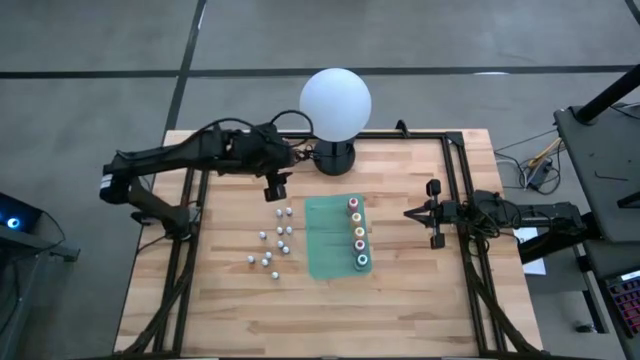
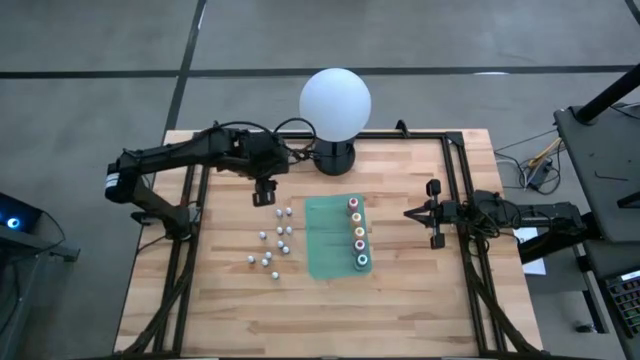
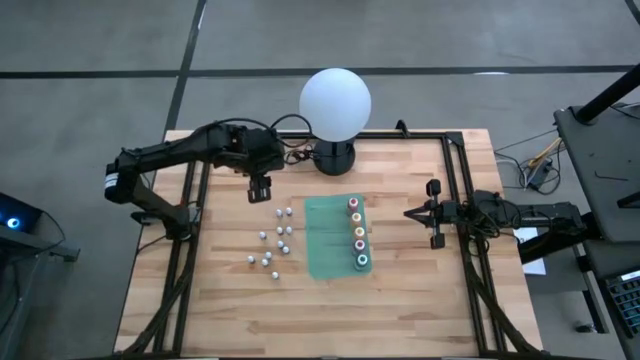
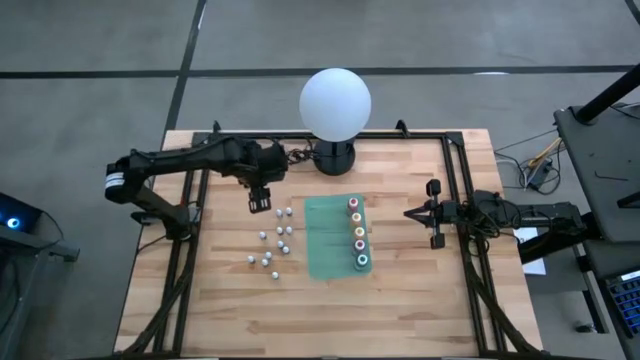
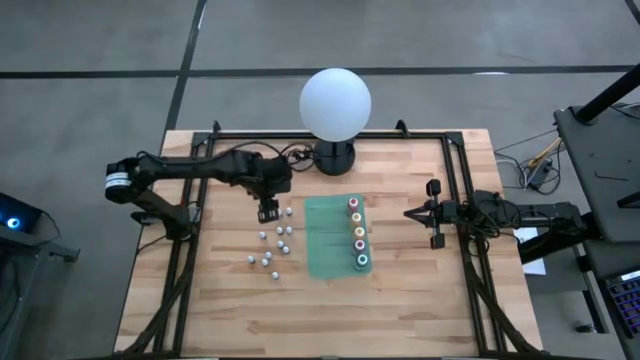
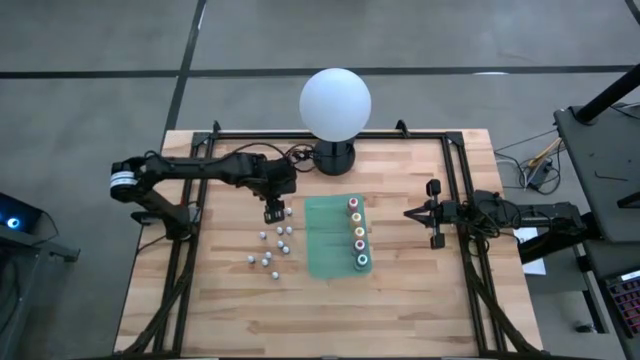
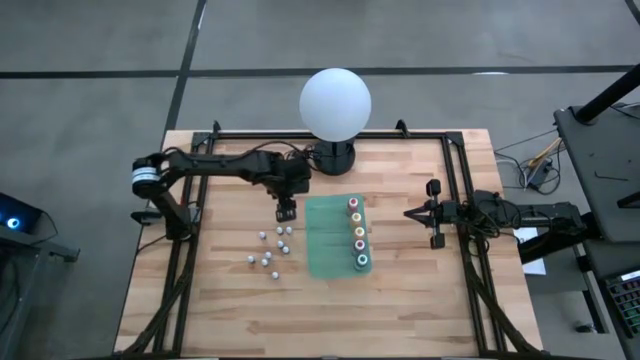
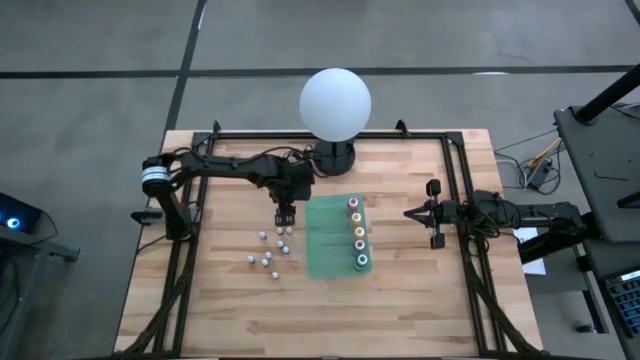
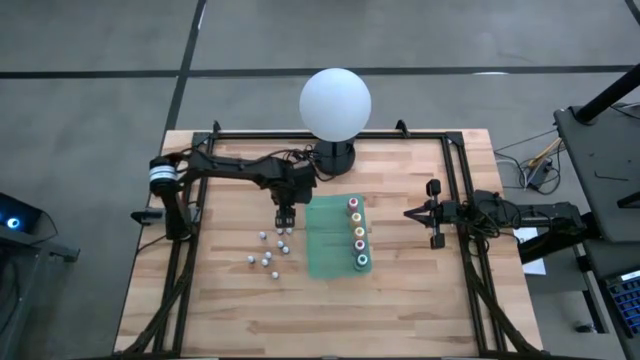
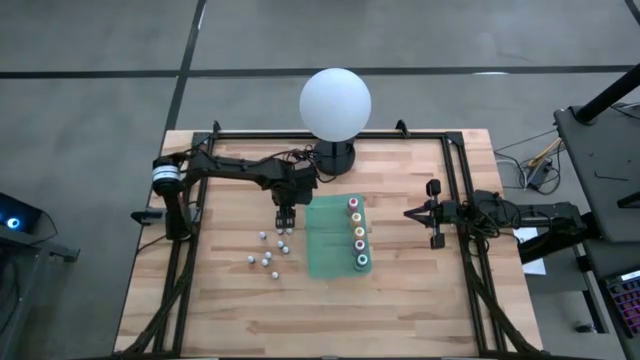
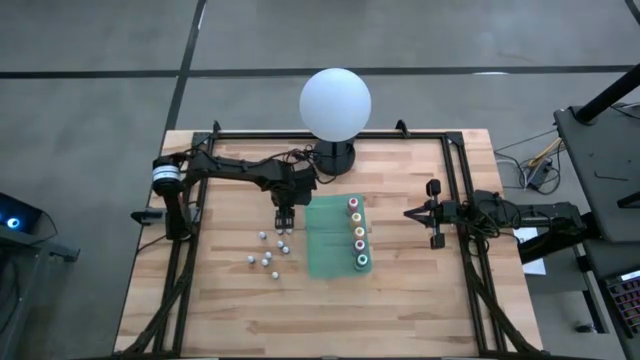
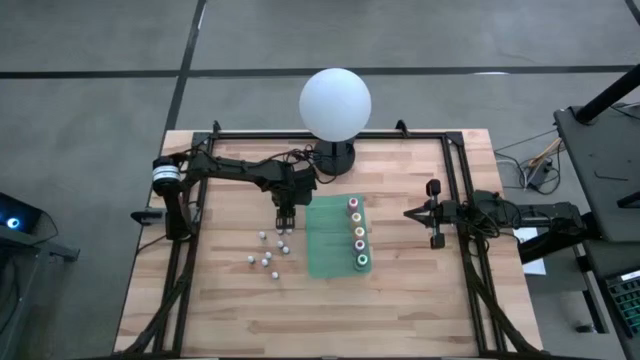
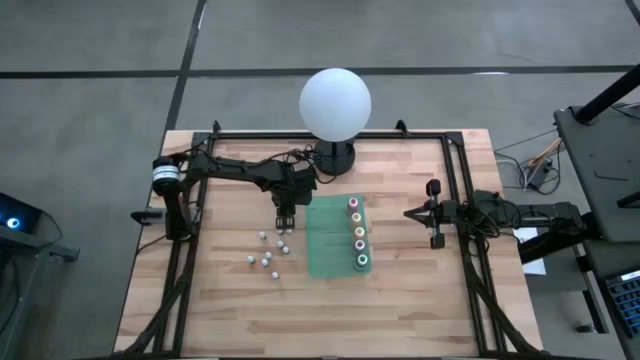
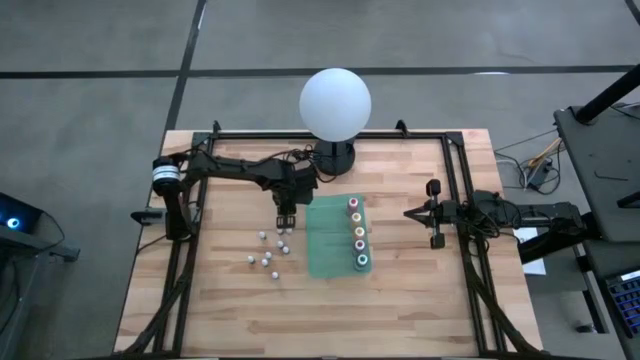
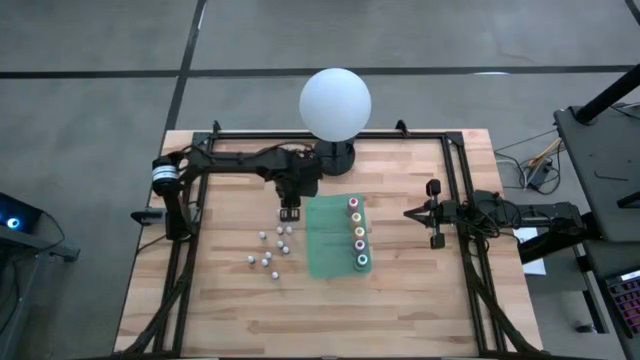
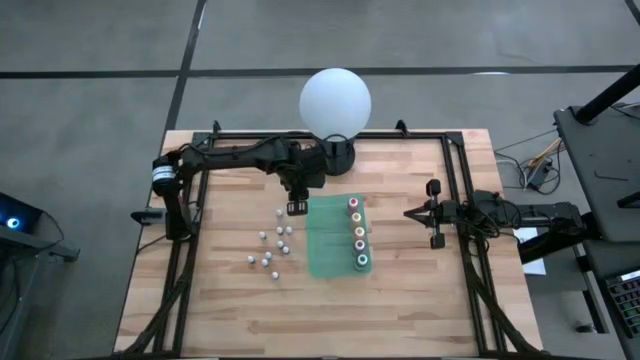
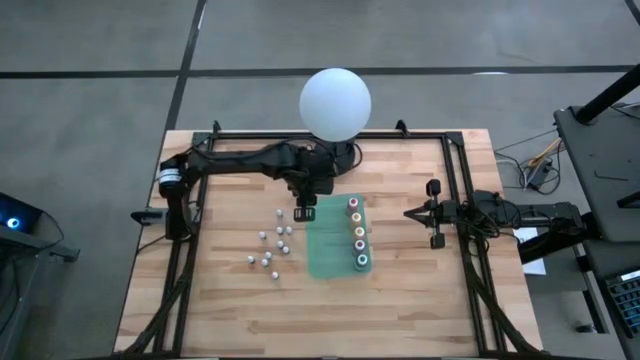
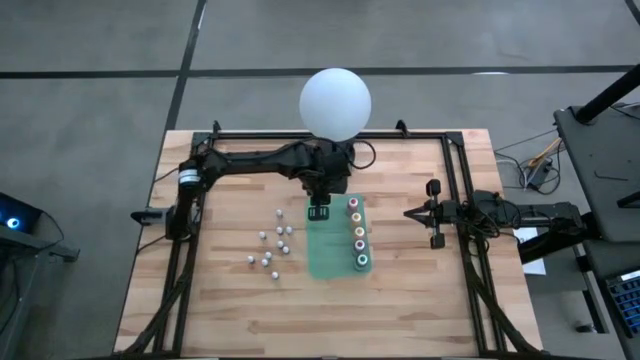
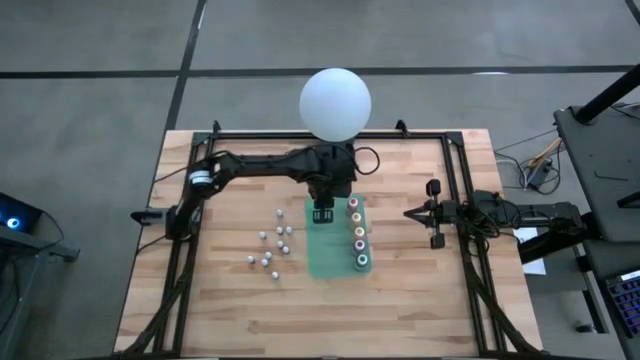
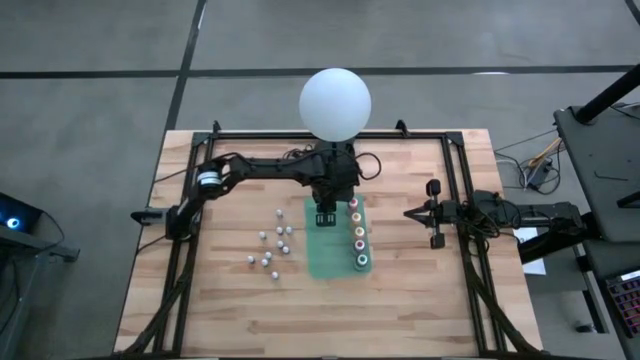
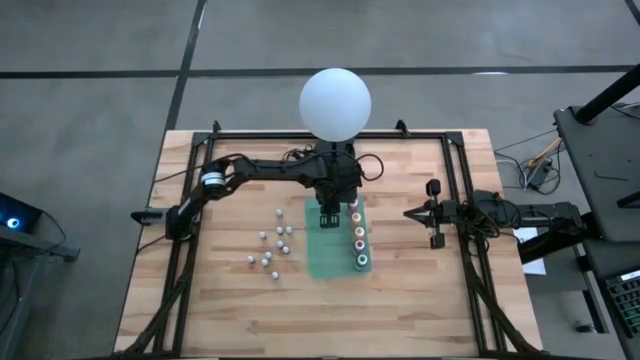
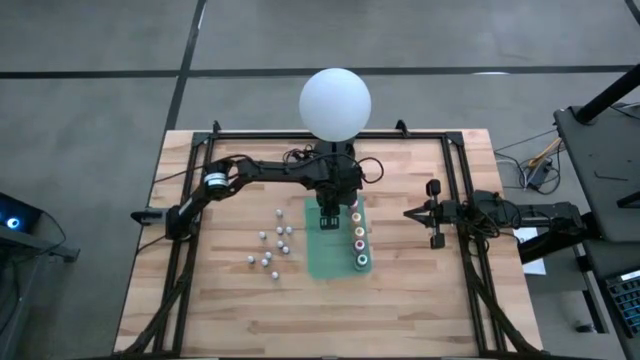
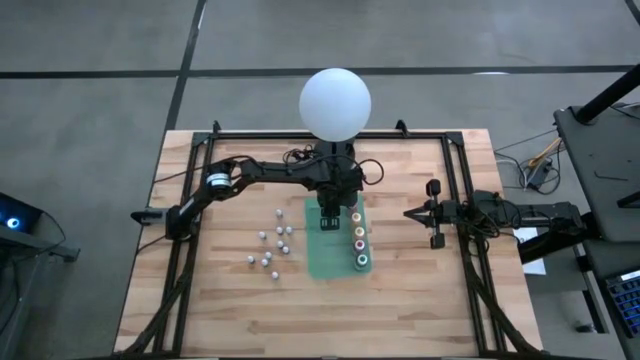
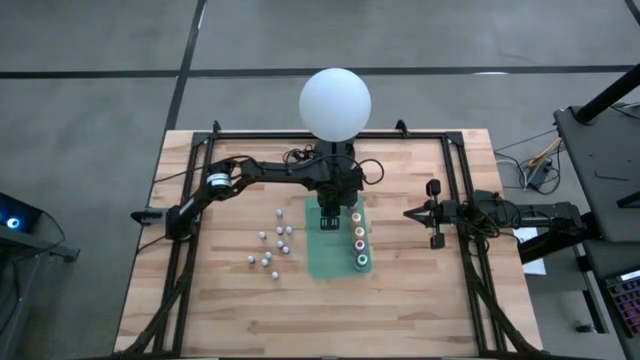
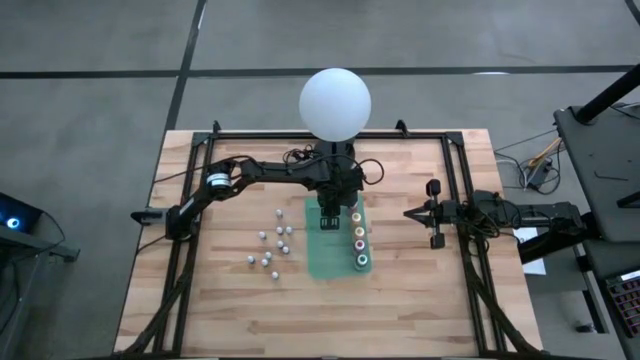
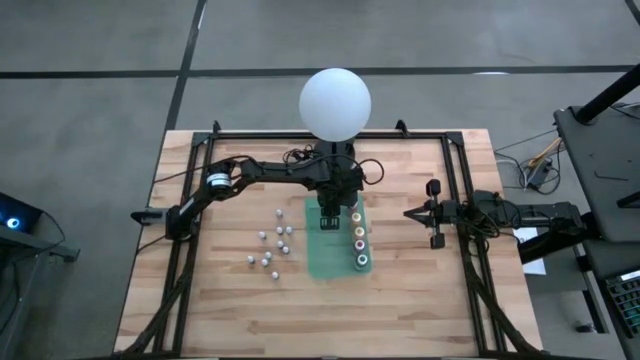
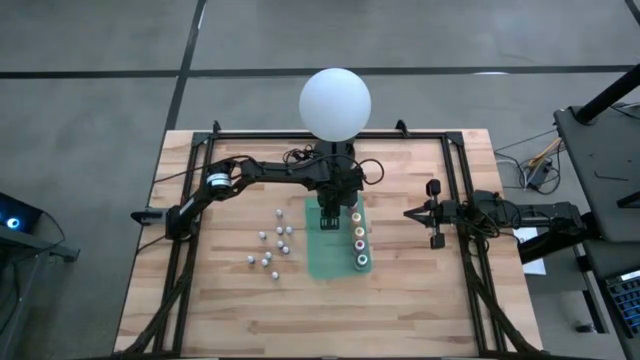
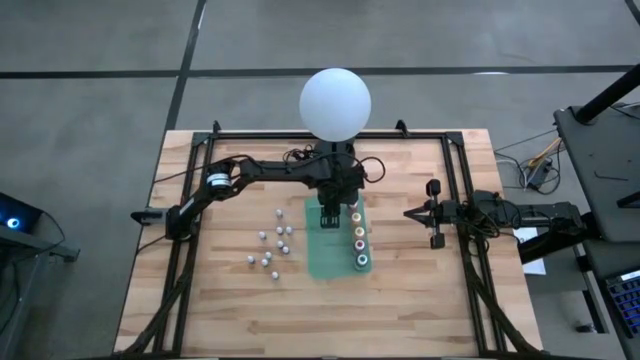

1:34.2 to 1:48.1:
Task: Pick & Place food coloring
Put the small orange food coloring bottle into the green bin

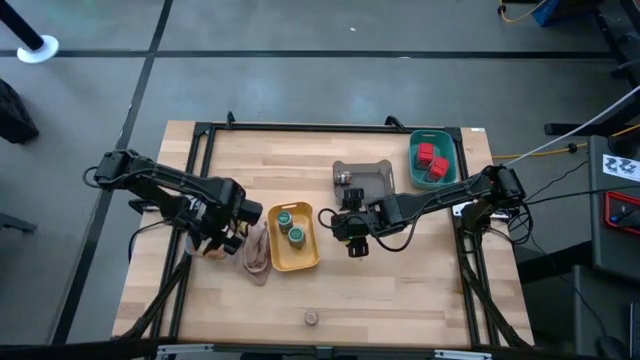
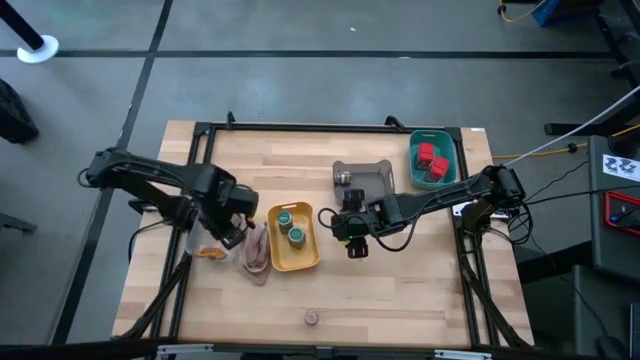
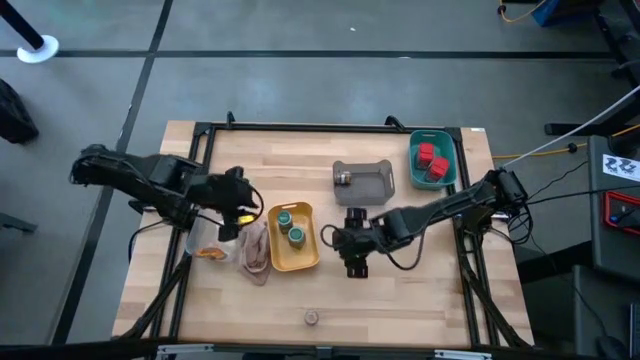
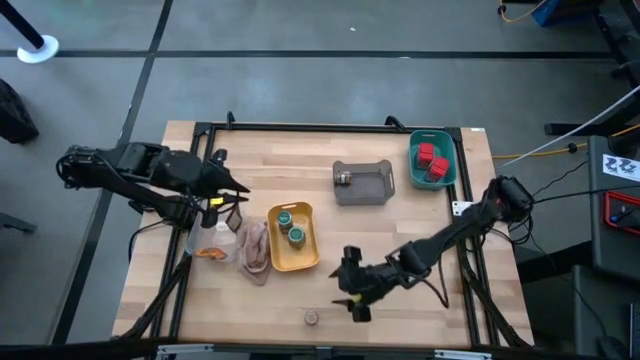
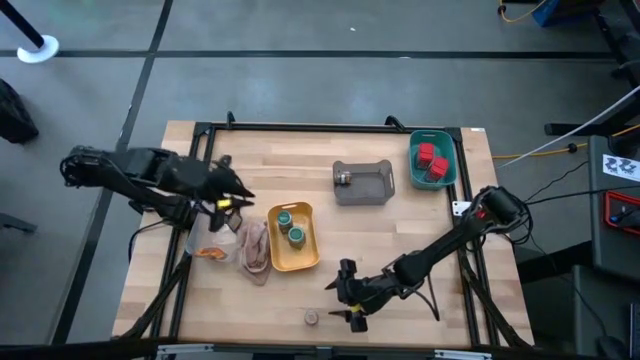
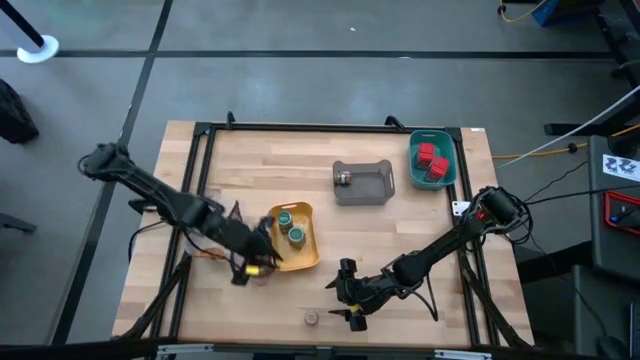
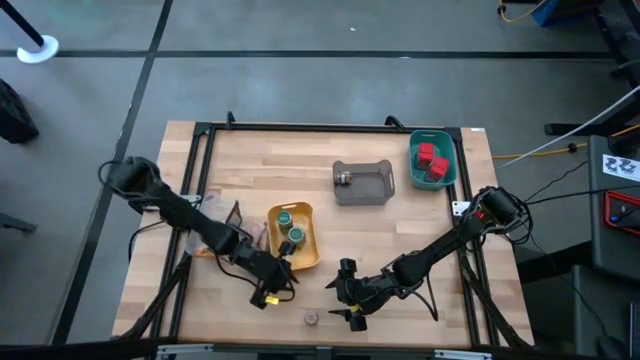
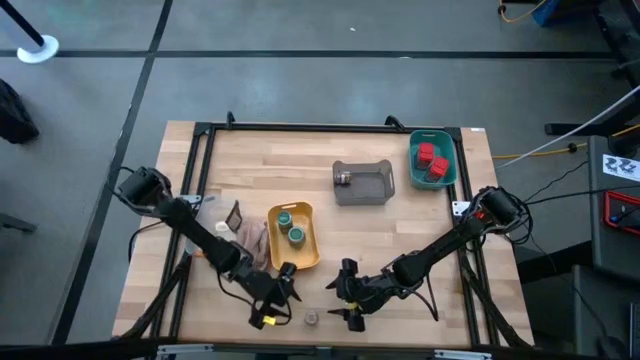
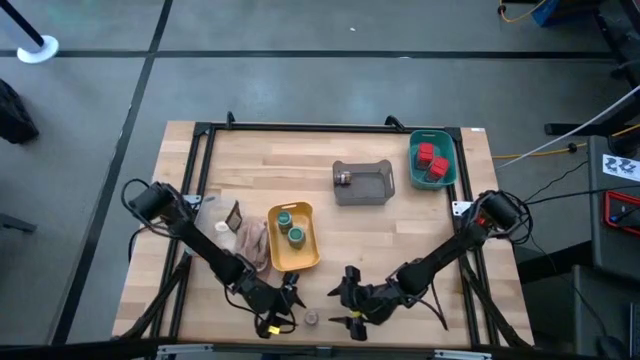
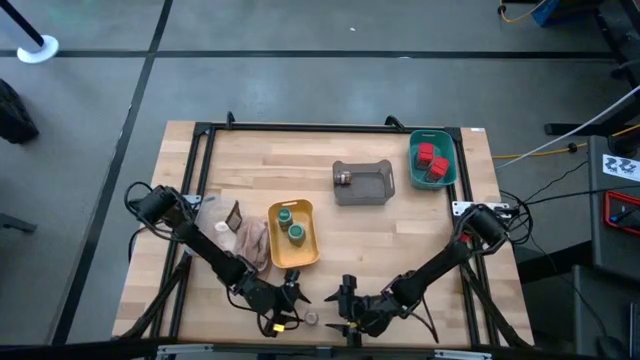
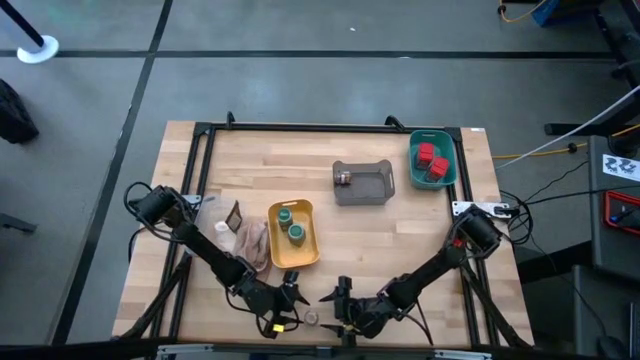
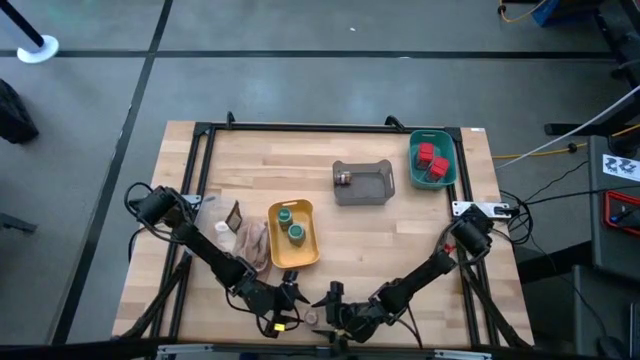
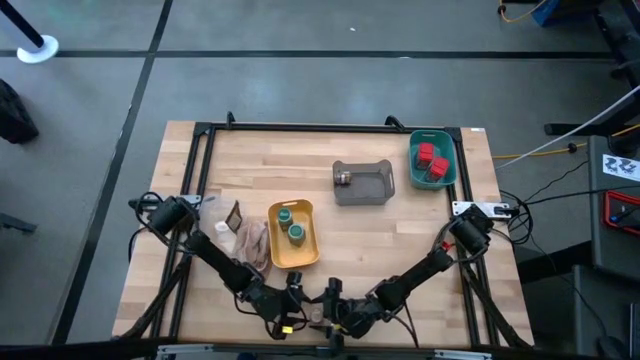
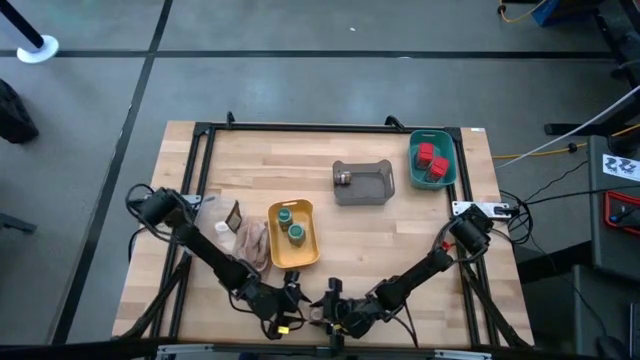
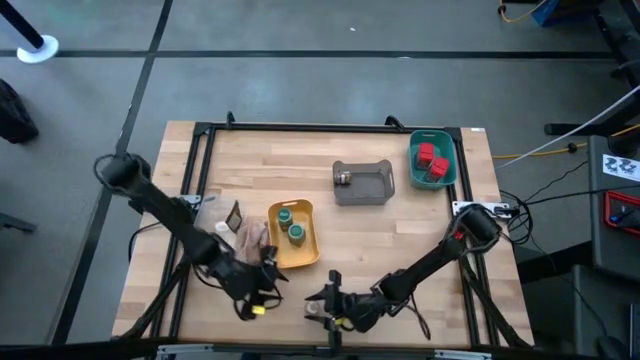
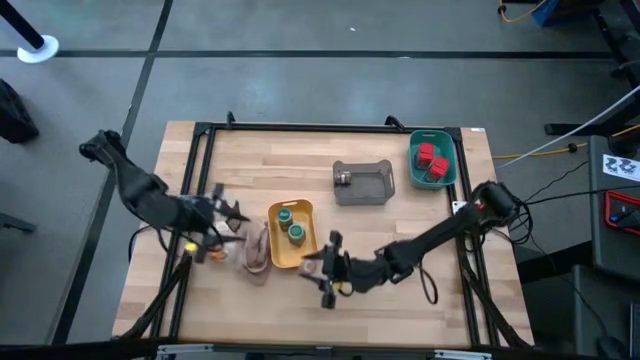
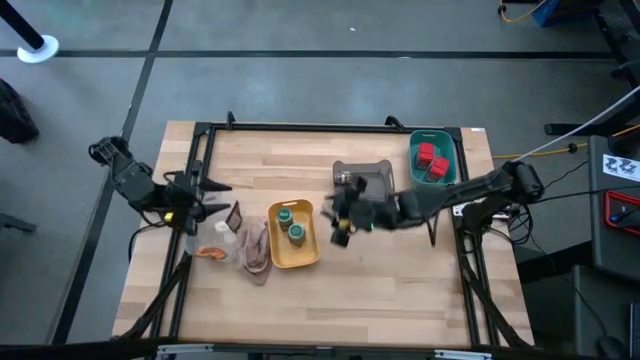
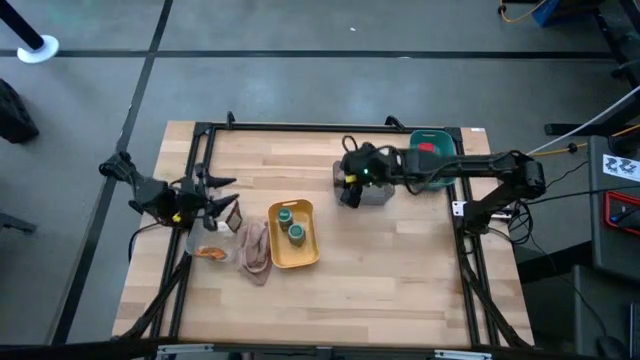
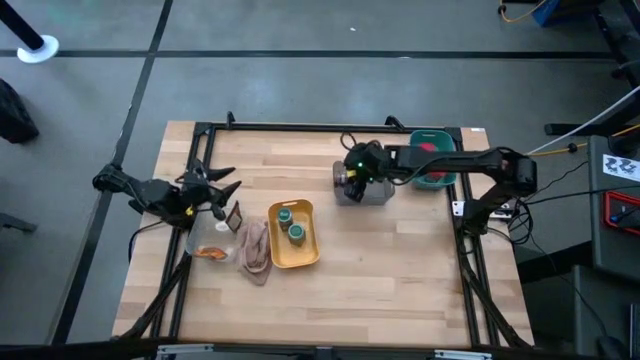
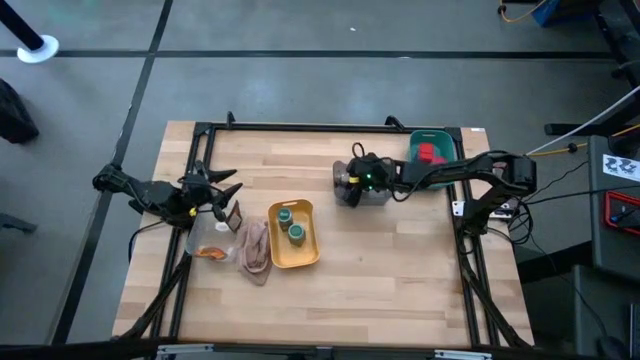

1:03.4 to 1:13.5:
Task: Sort spices by type
Put the brown seasoning bottle into the gray bin
